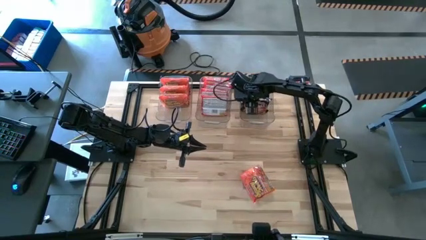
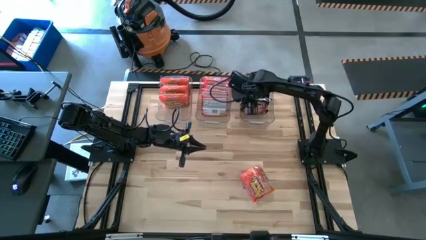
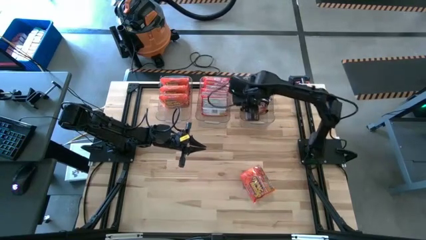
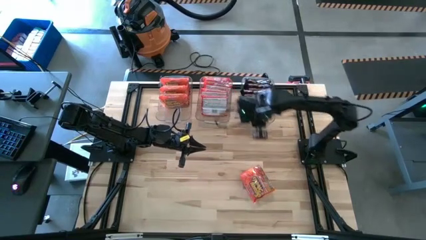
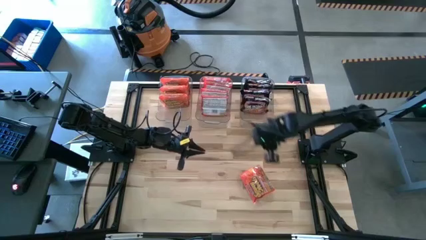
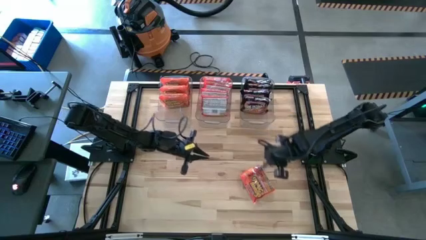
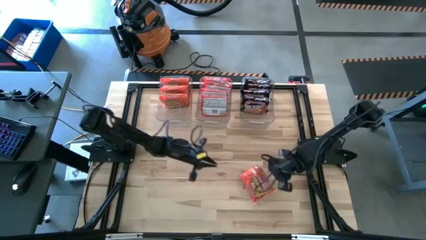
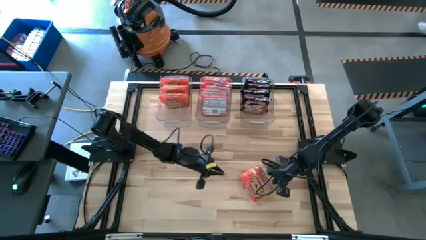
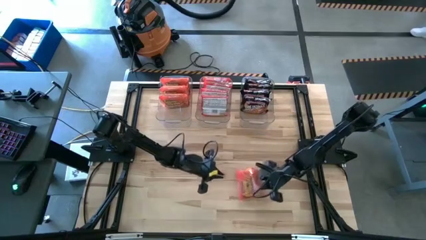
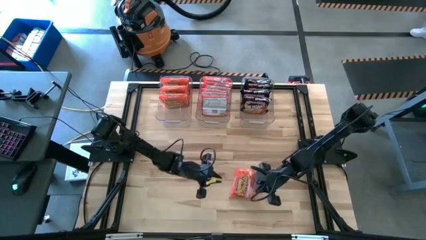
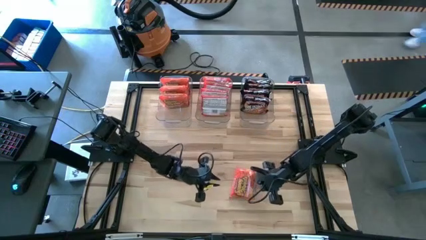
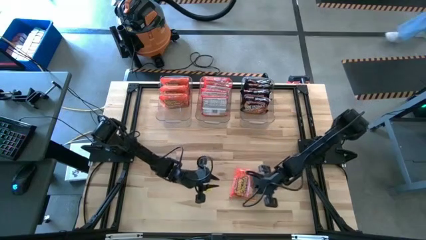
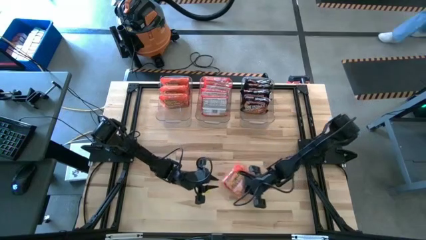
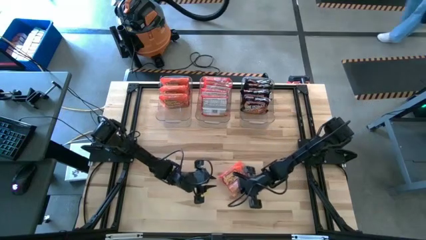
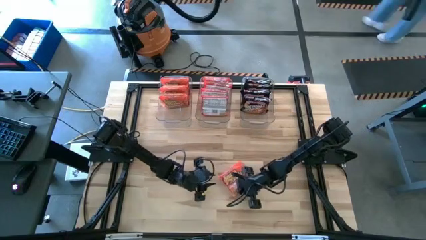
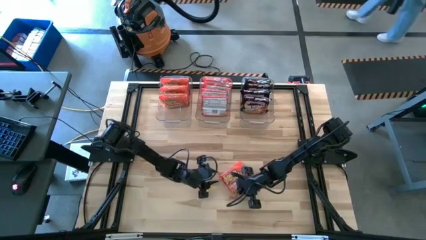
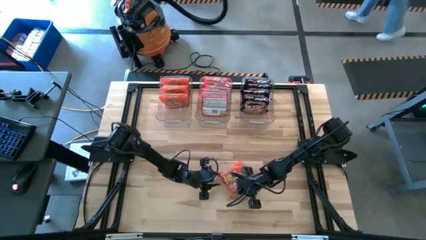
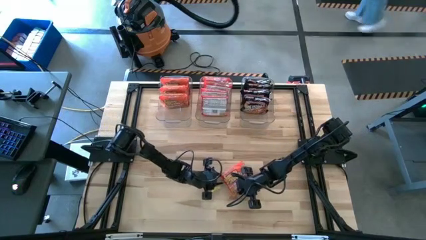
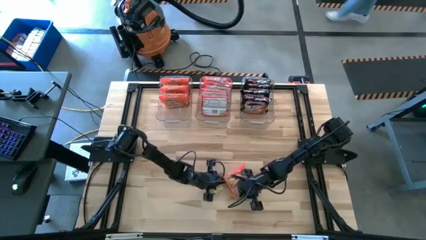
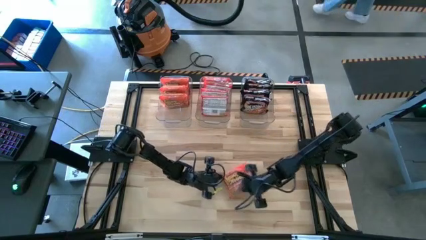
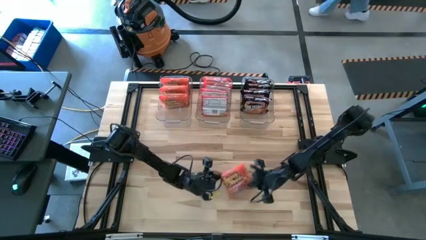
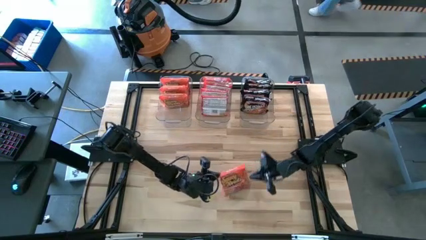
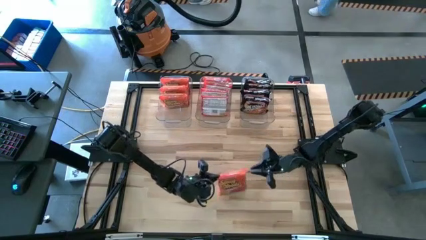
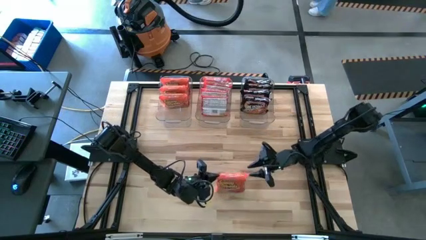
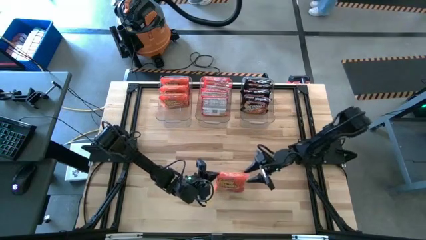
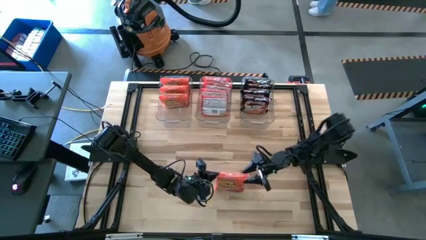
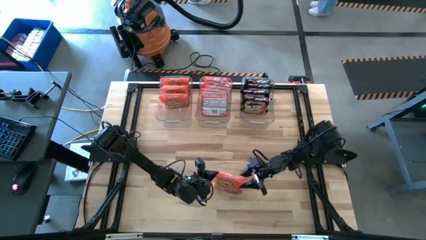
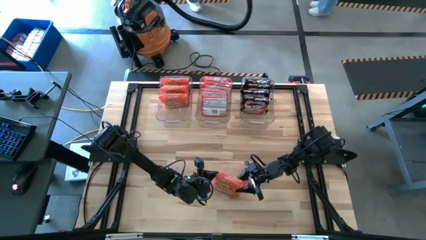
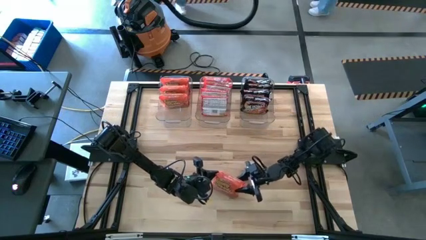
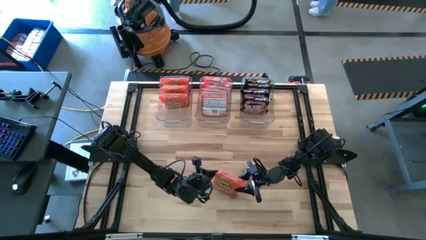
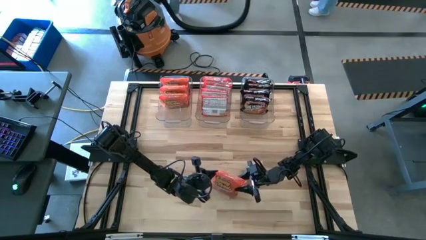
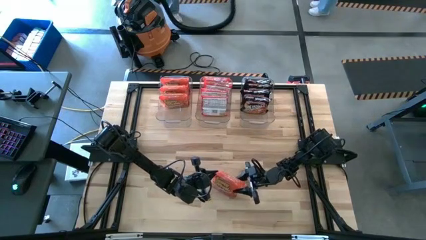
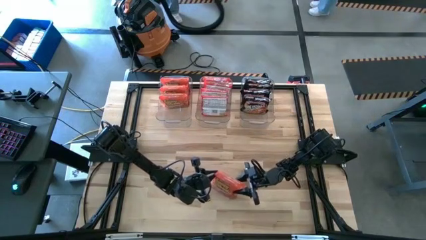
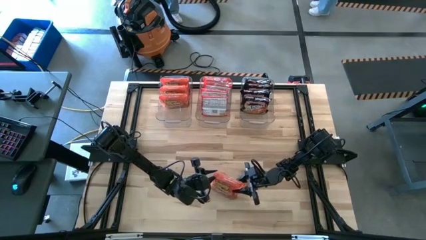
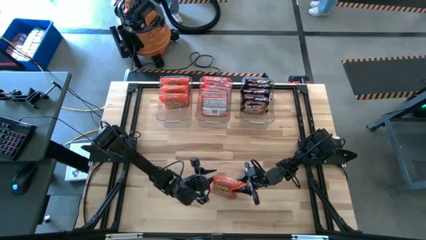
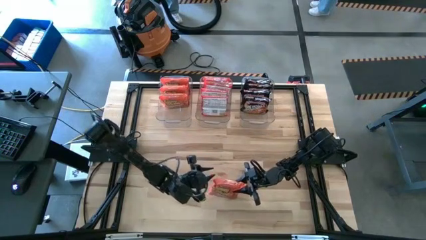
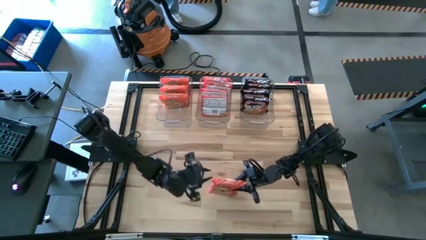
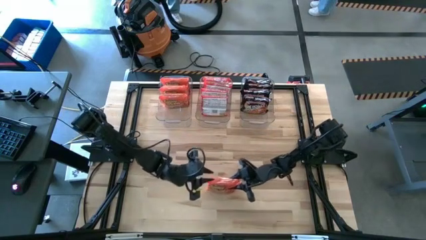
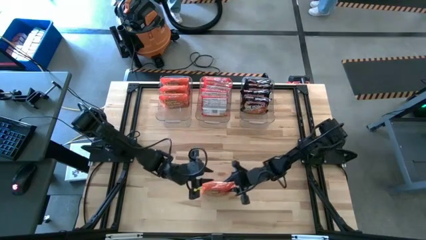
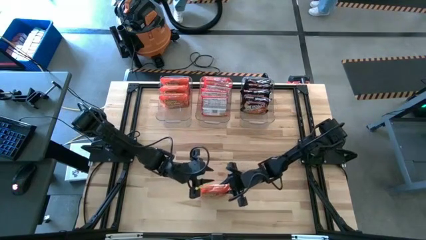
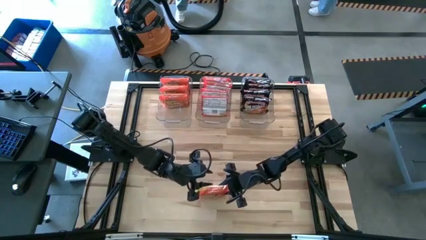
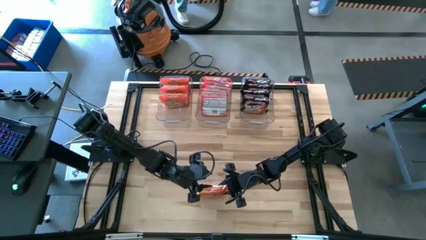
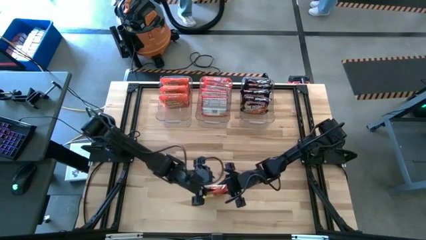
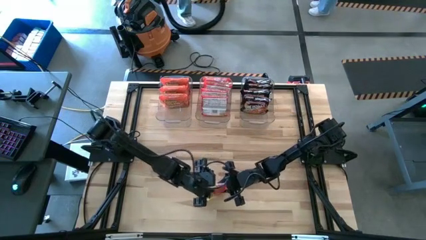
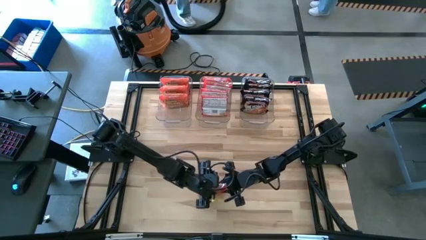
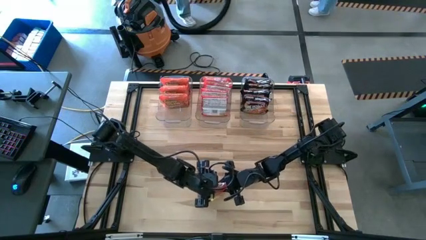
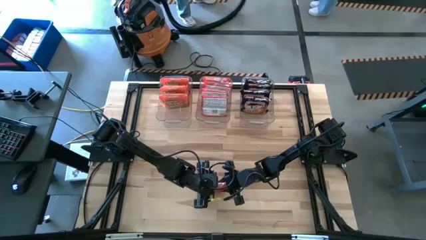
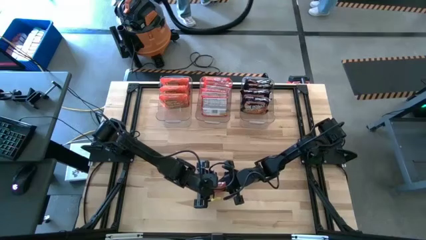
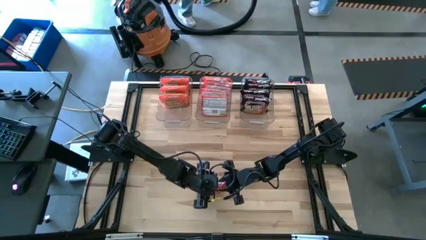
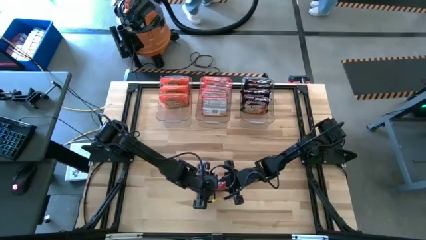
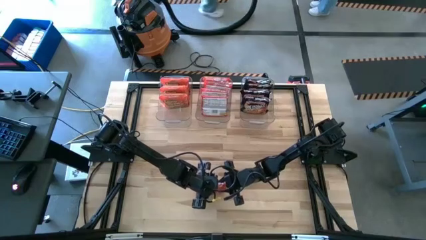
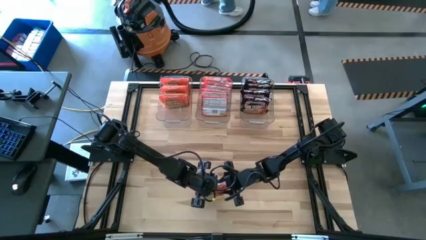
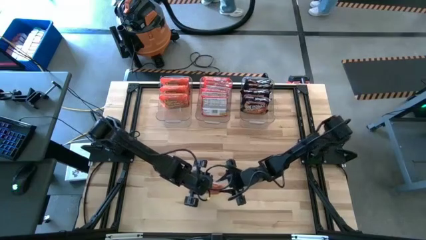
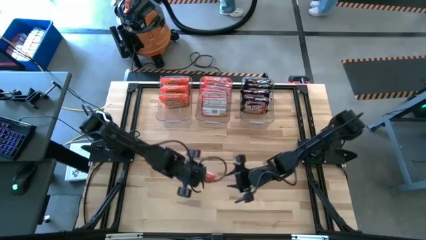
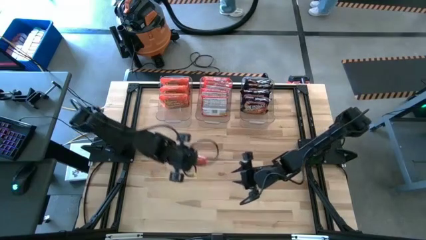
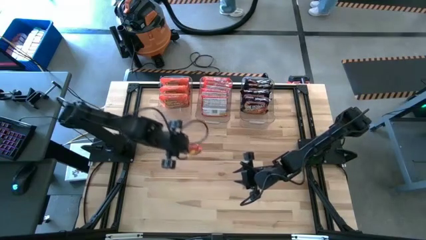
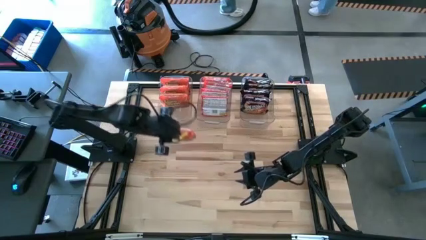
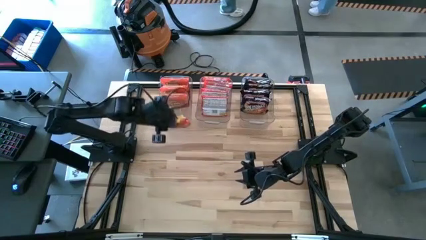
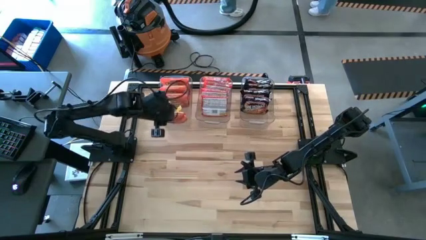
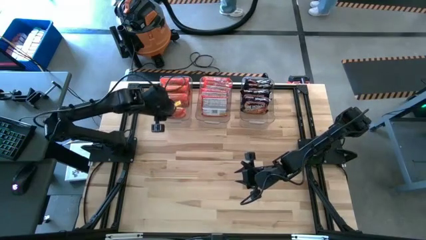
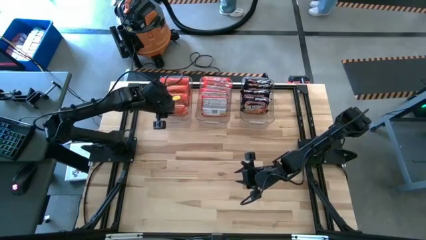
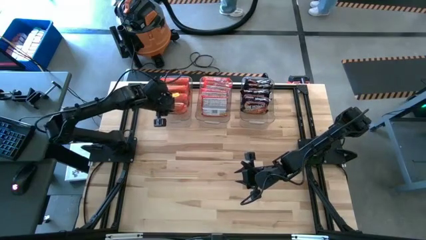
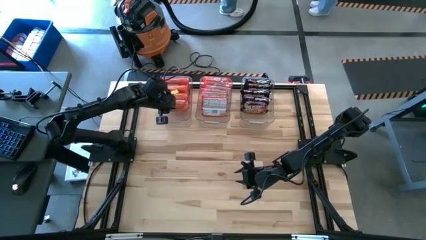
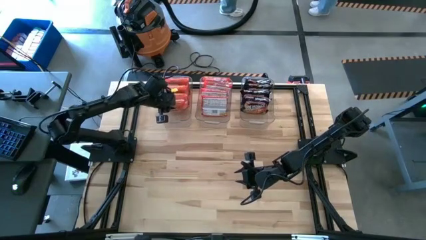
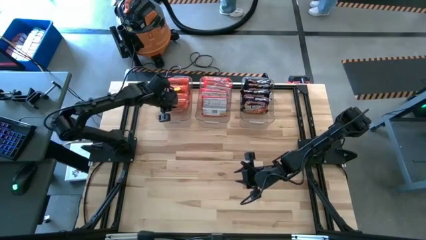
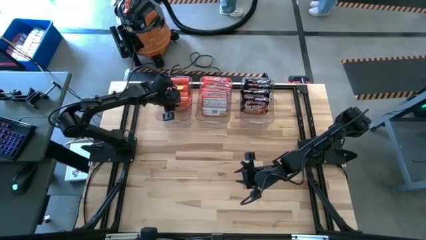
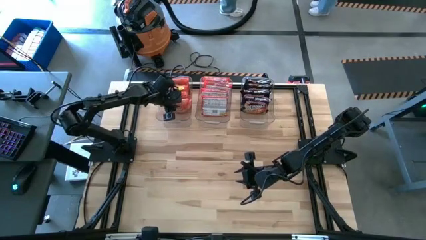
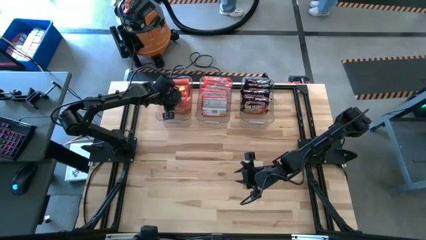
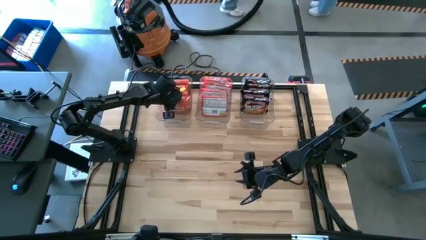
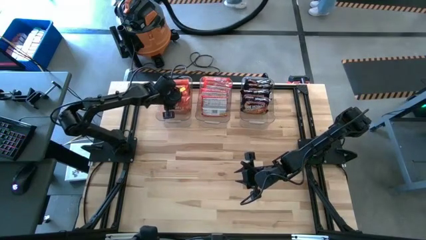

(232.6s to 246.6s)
Task: Sort Maruchan noodles
Put the orange noodle pack into the left transparent bin

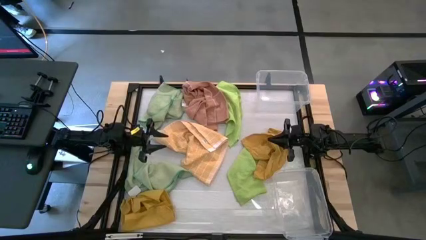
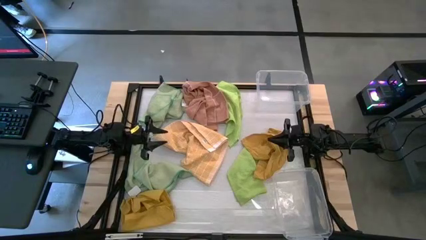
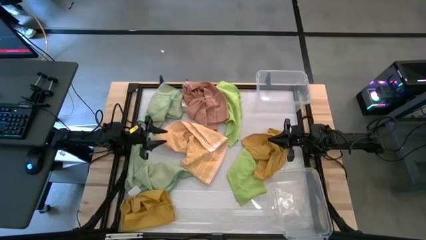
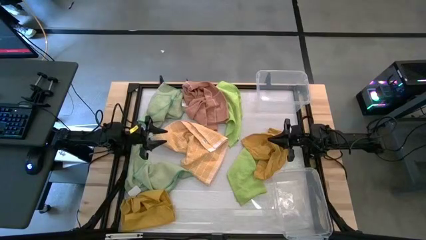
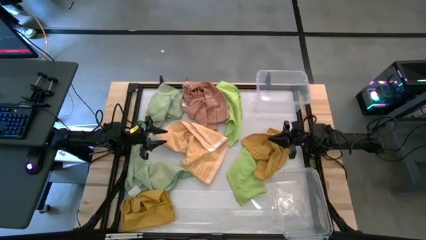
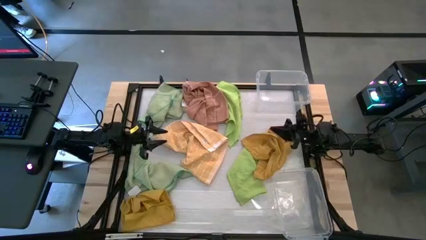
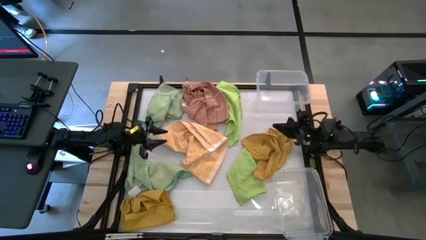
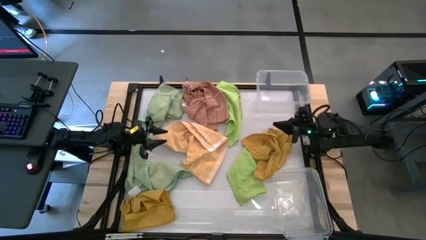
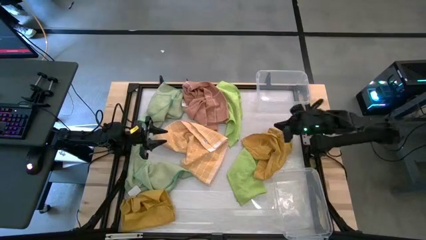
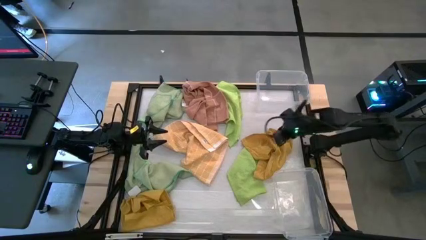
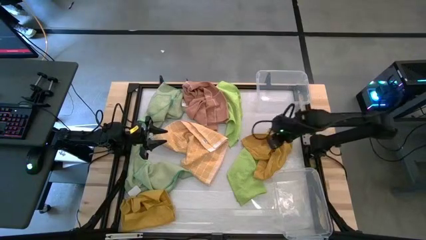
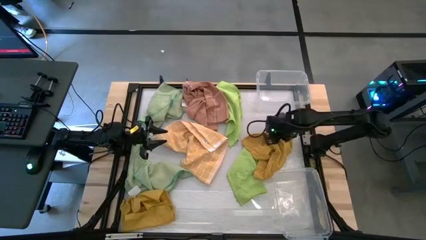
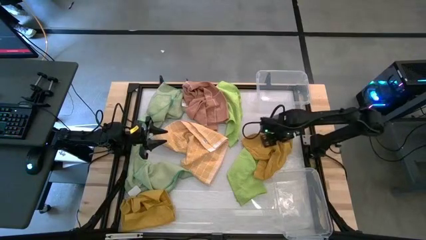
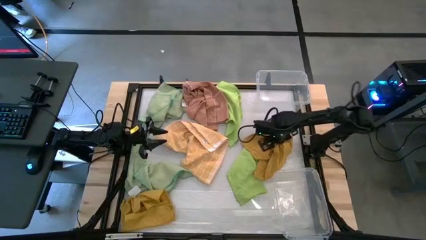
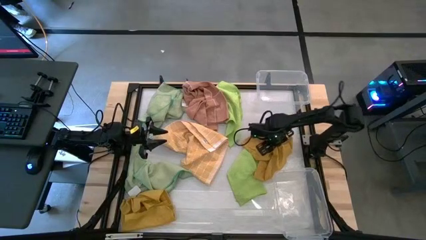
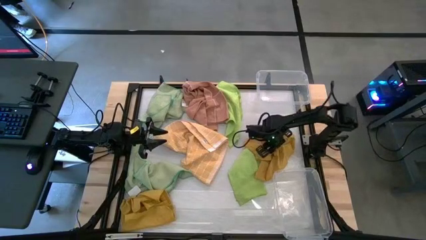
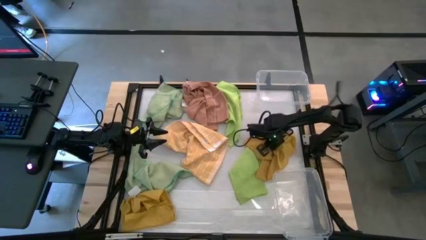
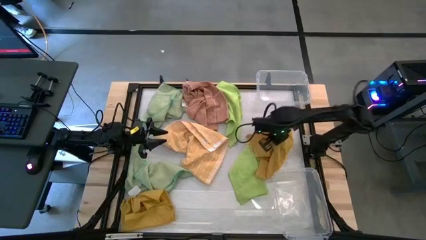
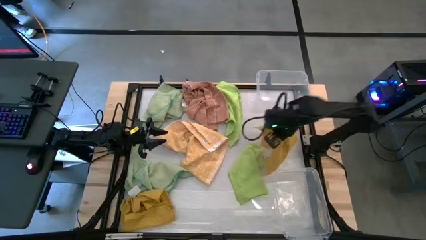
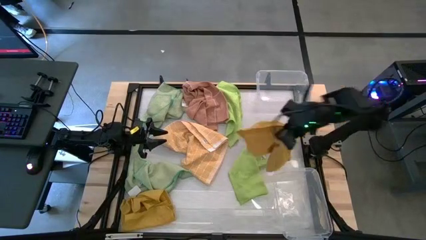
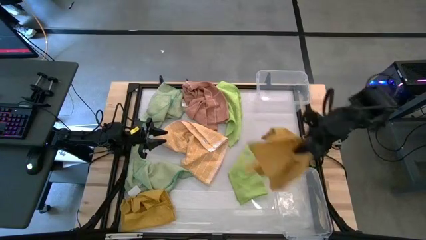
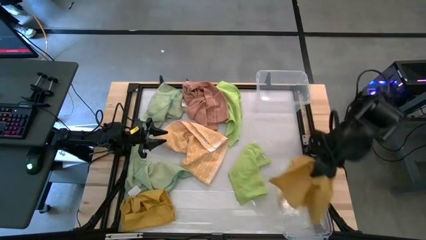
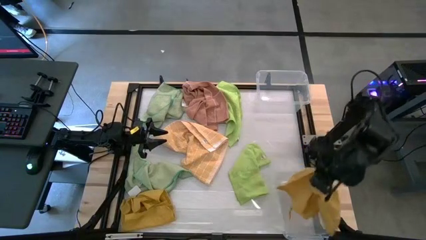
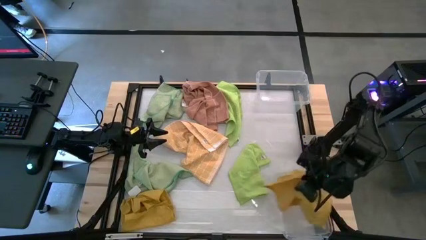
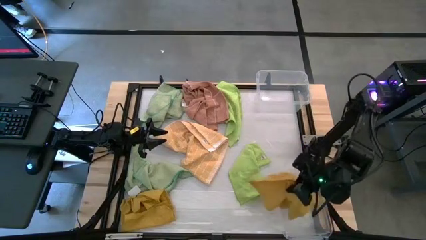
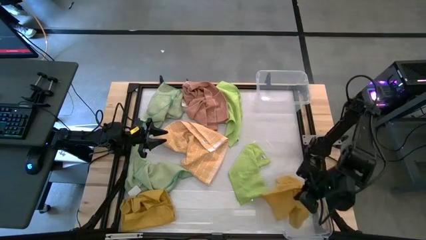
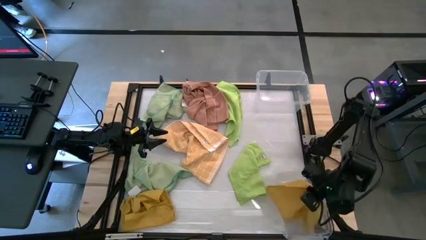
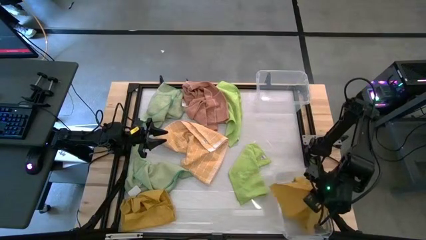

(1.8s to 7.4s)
Task: Sort towels by color in basket
Put the right mustard yellow towel into the bottom transparent bin
